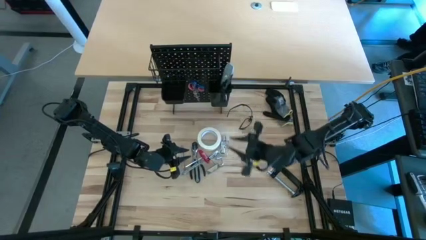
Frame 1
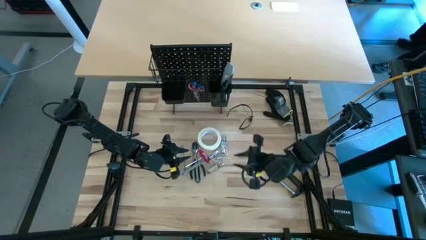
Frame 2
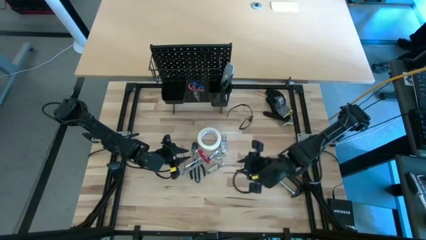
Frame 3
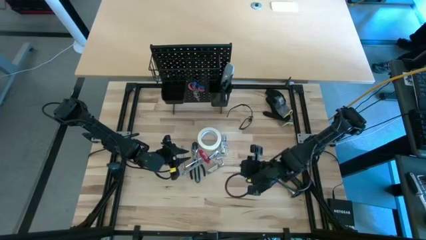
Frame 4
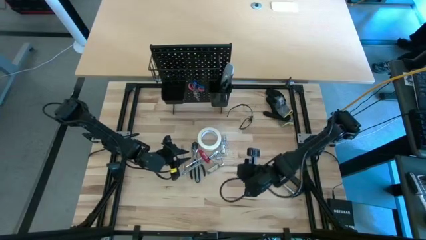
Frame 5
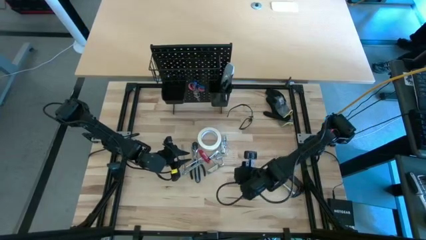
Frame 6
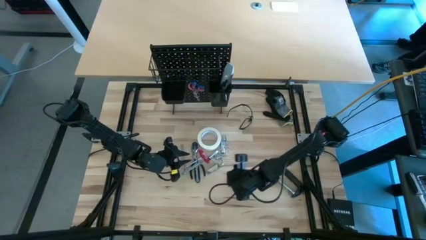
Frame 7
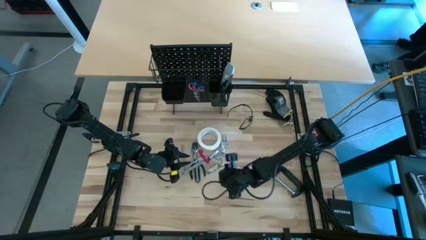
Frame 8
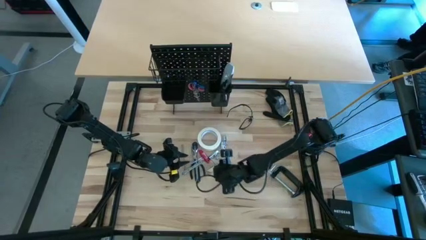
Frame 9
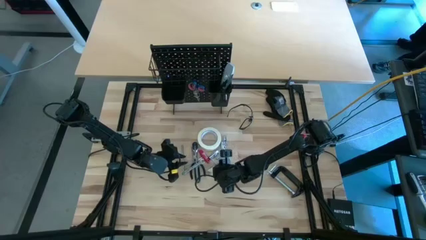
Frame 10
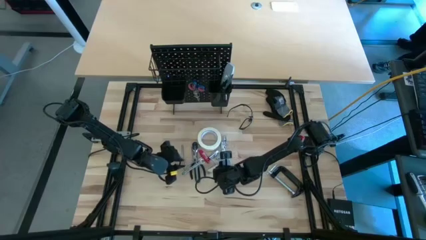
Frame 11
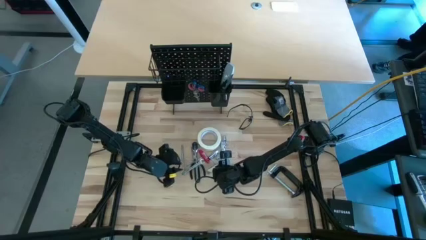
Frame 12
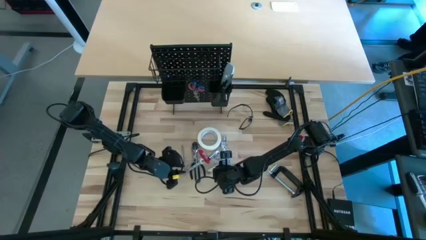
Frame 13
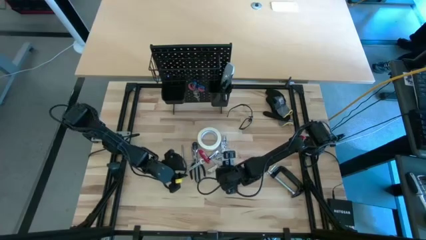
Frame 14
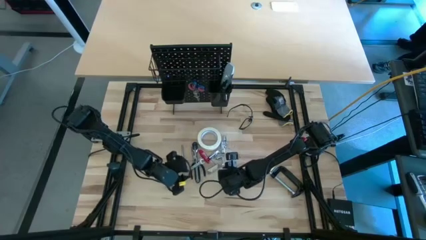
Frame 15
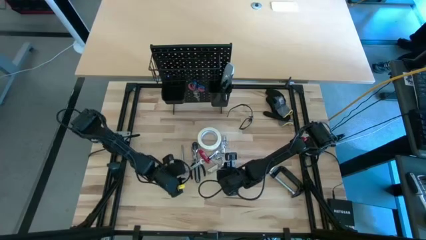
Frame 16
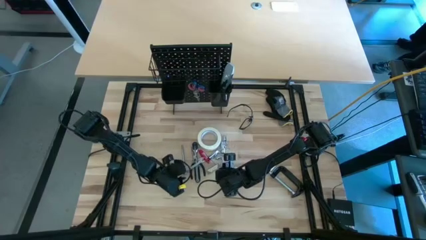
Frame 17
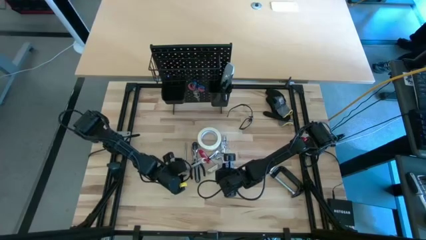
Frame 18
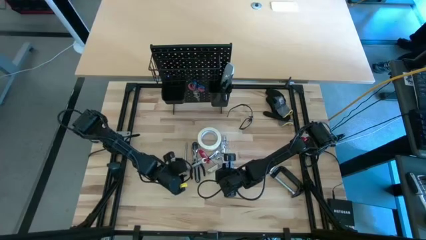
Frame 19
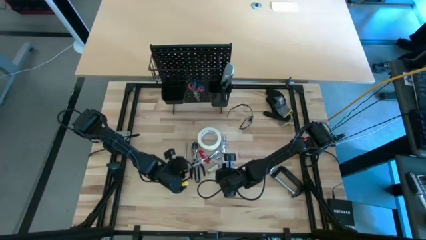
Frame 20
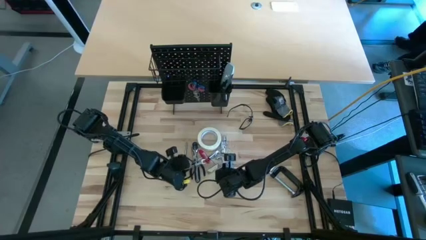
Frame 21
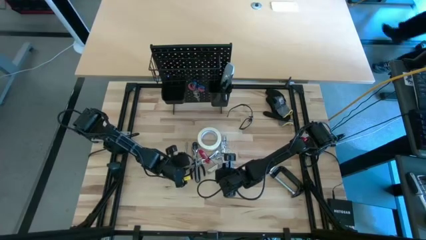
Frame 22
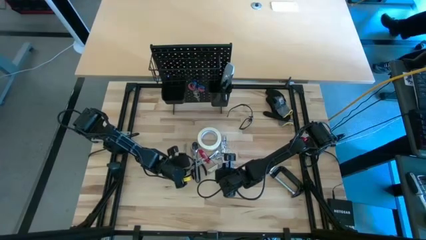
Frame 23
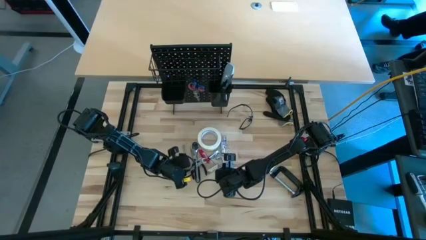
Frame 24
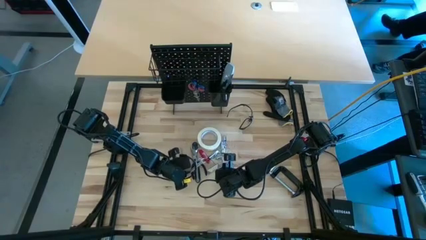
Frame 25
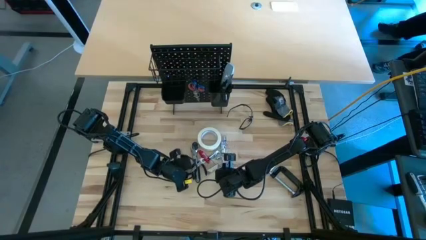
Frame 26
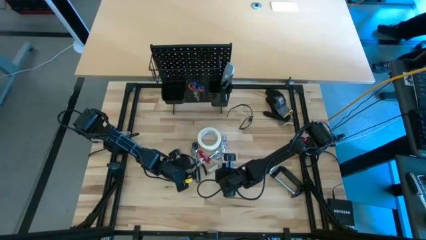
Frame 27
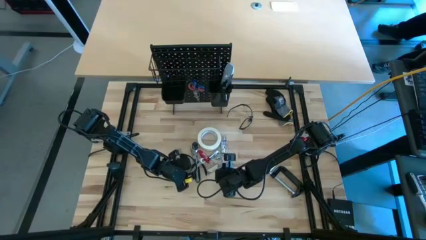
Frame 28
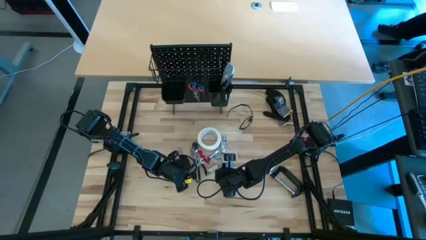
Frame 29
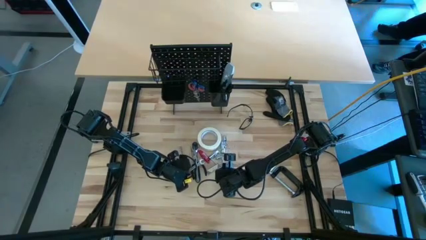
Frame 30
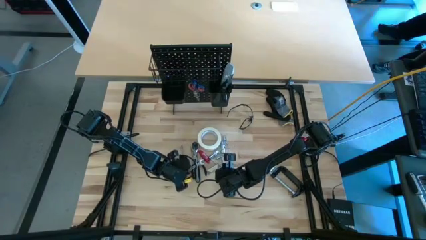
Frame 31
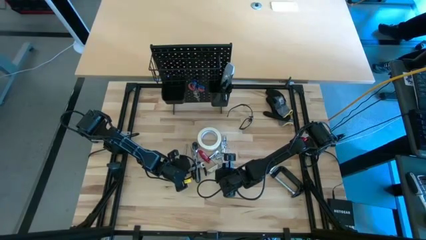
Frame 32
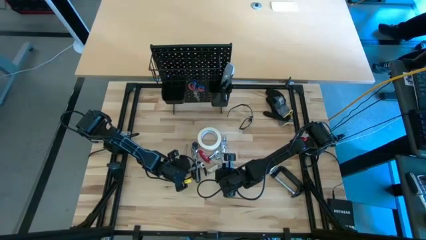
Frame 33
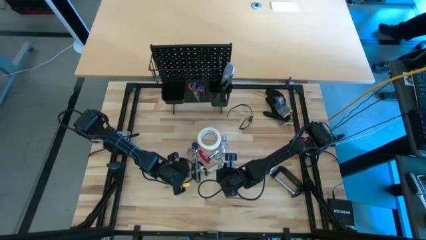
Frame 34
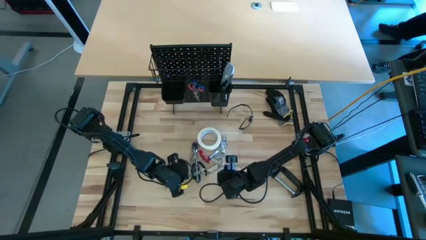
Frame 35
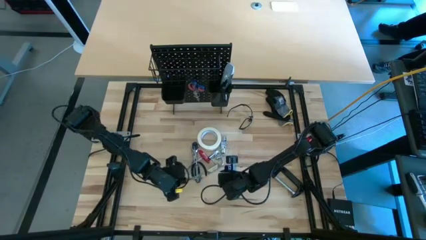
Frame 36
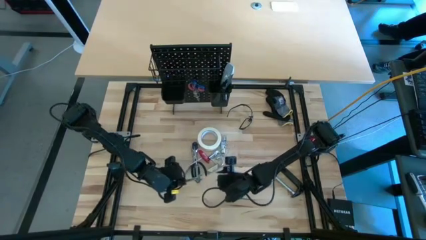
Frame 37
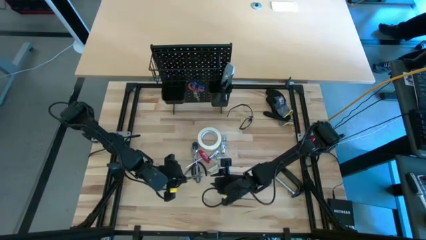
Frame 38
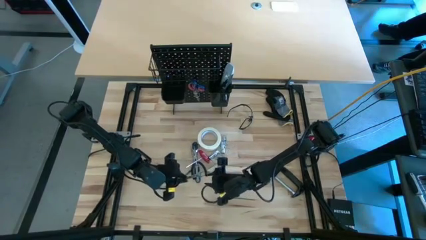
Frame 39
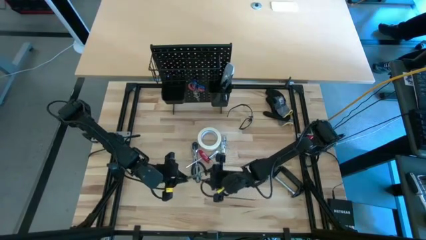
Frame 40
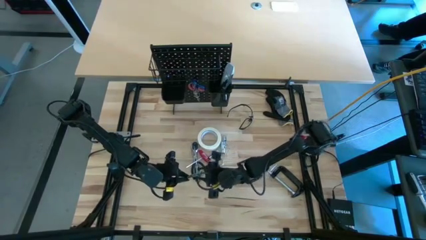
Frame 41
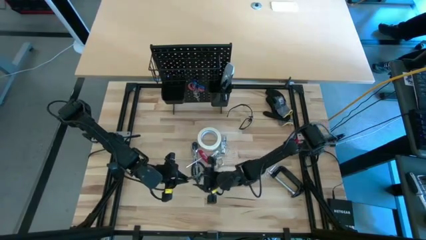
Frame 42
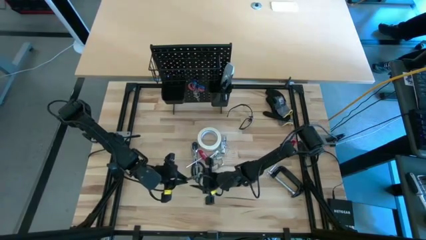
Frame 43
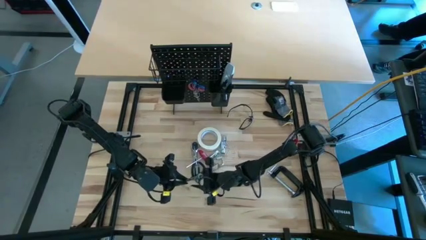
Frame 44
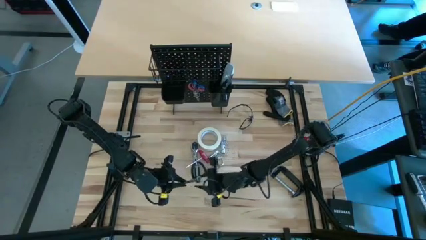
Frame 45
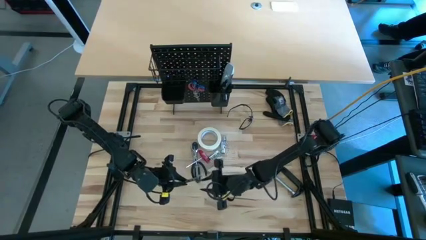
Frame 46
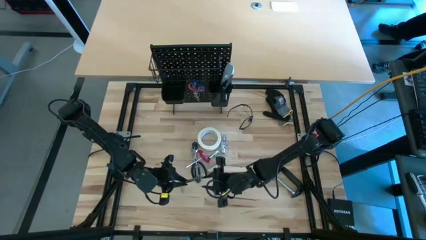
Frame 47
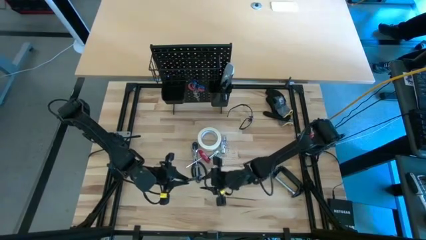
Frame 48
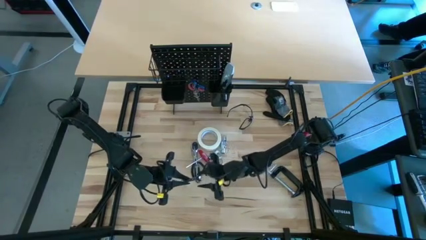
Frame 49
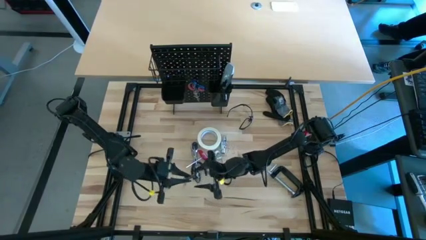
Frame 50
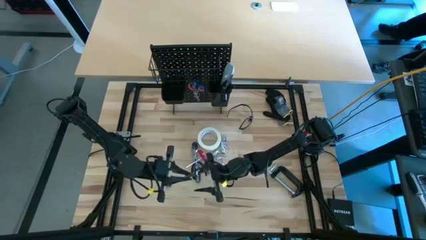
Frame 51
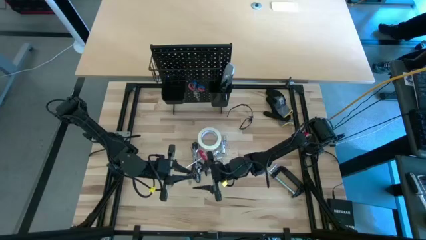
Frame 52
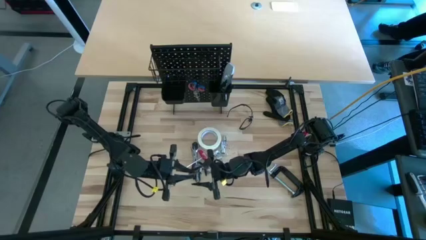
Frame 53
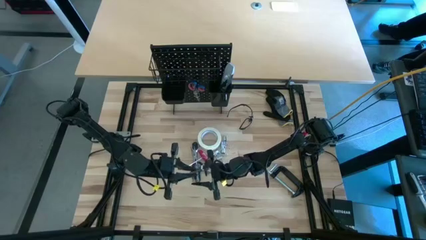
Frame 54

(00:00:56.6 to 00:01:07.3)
Task: Hang tools onto peg board
Put the silver wrench into the right black bin on the peg board

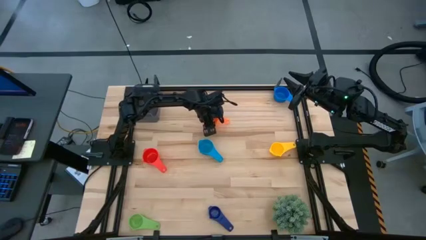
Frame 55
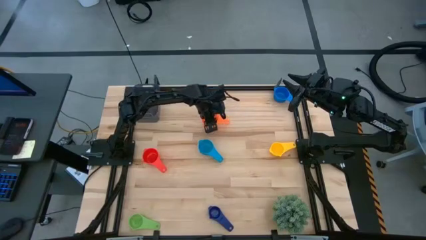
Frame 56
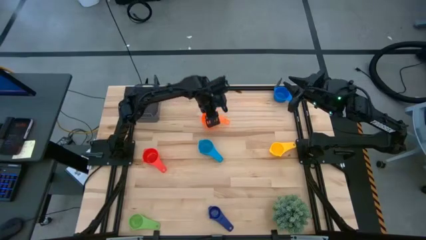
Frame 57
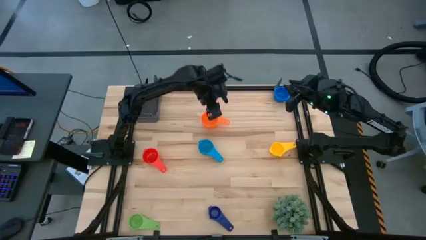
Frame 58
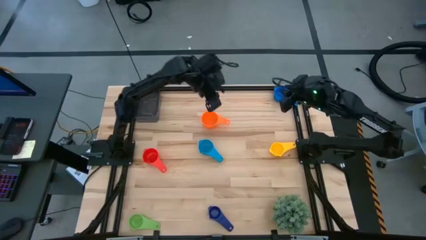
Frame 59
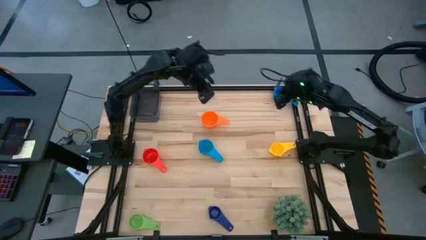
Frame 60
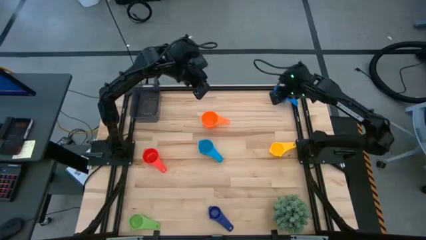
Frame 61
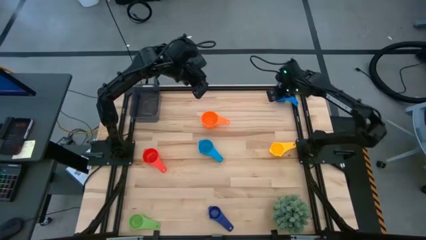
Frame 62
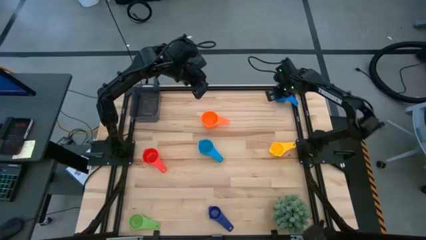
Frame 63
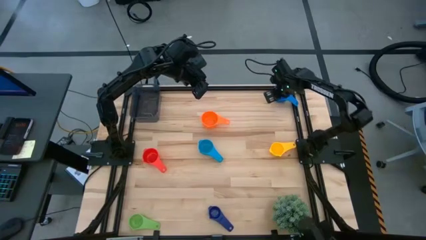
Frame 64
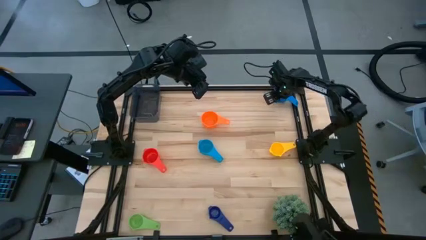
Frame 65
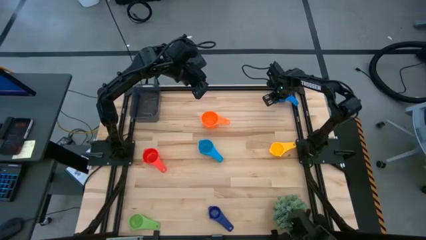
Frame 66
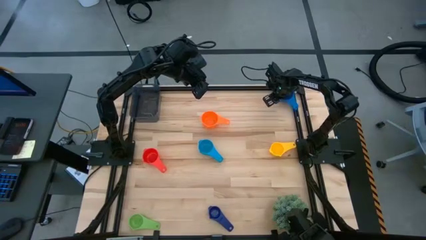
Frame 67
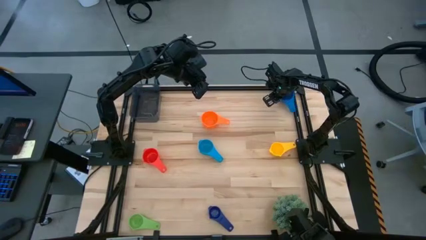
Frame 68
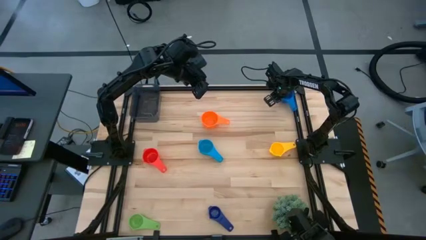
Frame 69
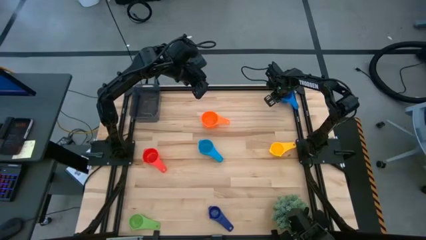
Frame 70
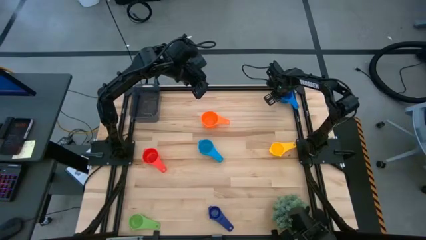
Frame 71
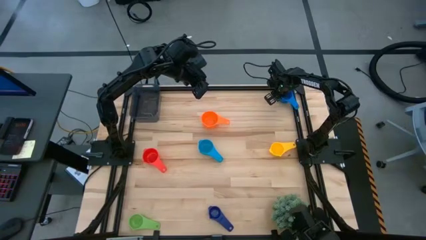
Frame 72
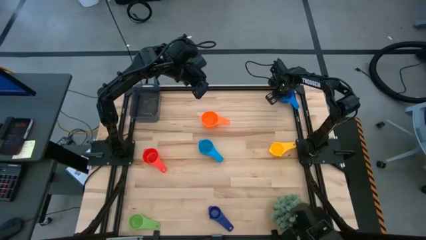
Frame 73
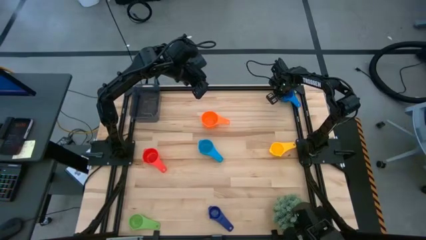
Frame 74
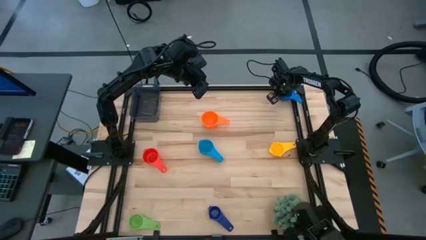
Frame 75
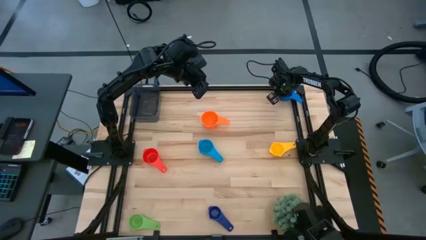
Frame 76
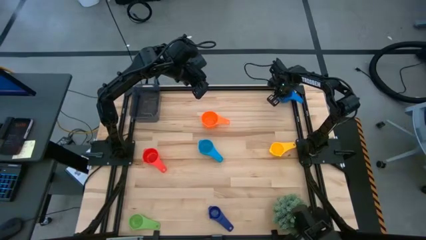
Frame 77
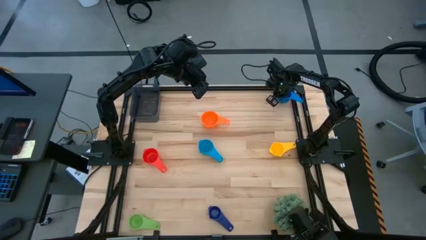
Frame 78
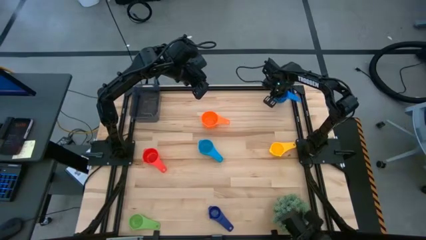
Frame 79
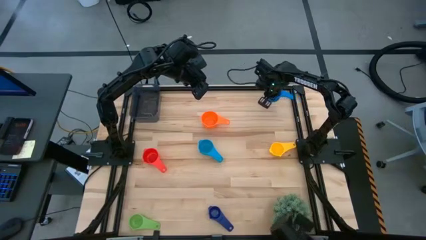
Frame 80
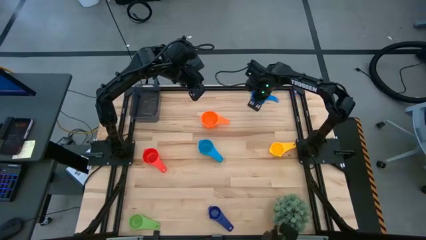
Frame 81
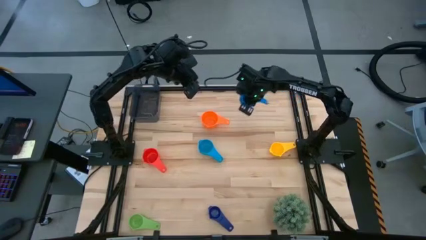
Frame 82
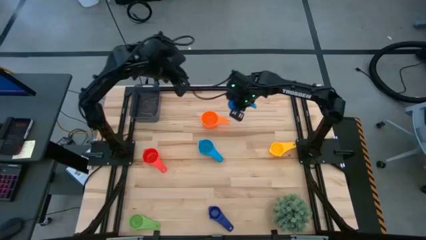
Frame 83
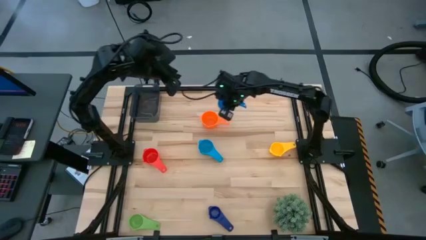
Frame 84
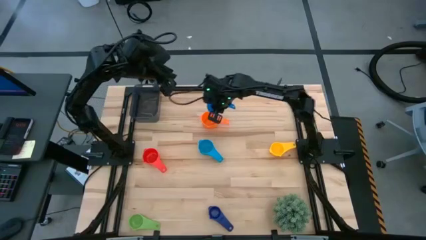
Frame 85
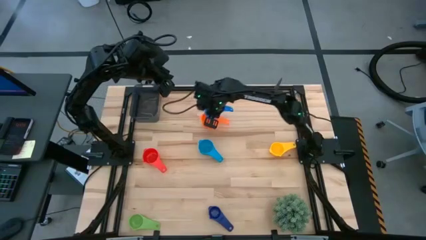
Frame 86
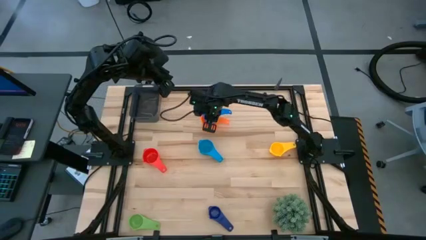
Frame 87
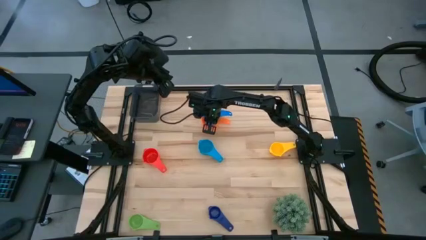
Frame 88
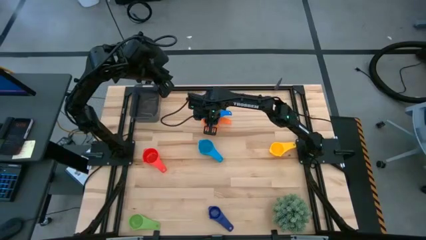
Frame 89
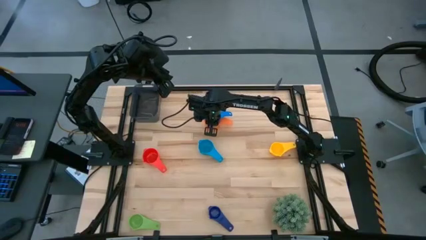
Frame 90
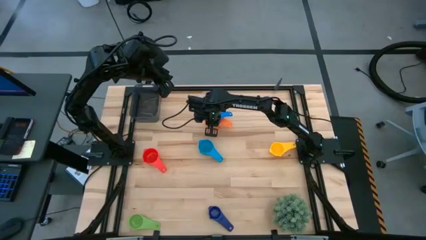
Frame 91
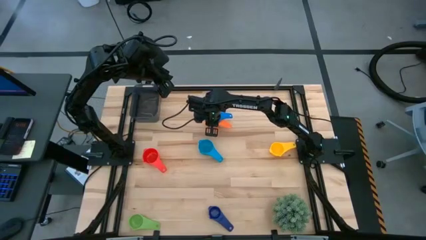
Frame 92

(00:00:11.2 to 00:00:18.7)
Task: Nest measuring cups in basket
Stack the blue measuring cup on top of the orange measuring cup
